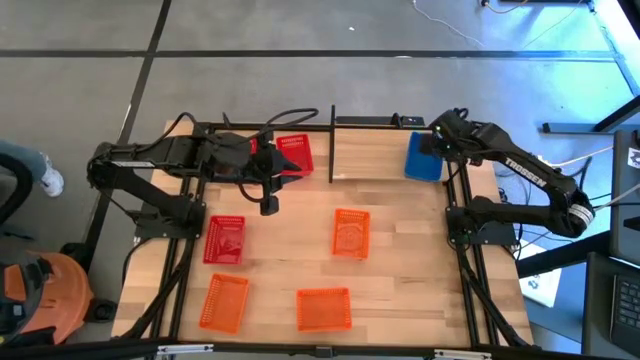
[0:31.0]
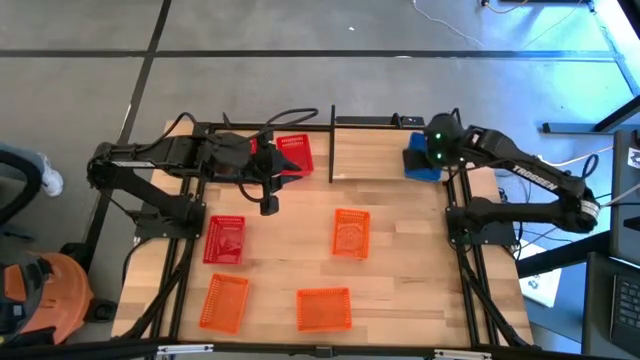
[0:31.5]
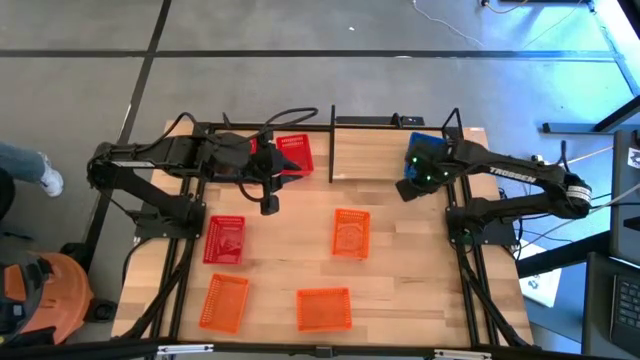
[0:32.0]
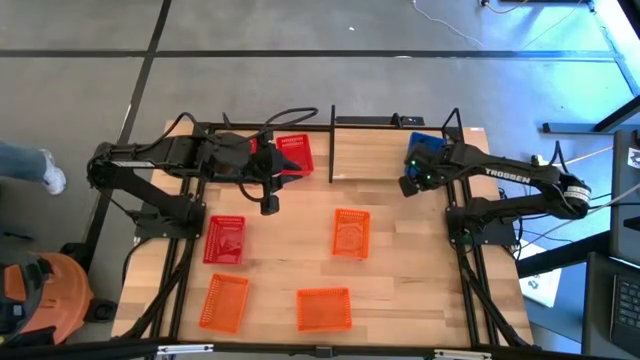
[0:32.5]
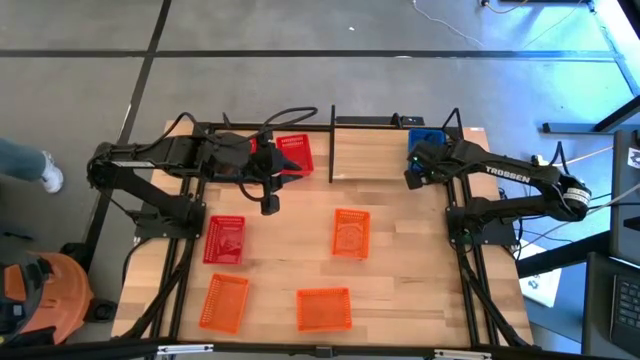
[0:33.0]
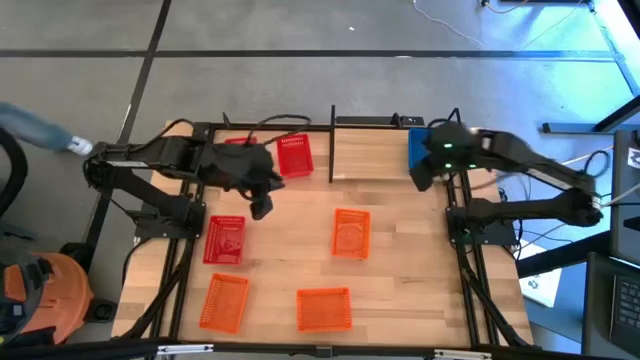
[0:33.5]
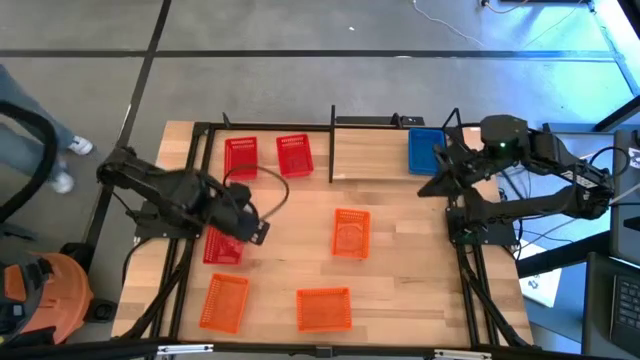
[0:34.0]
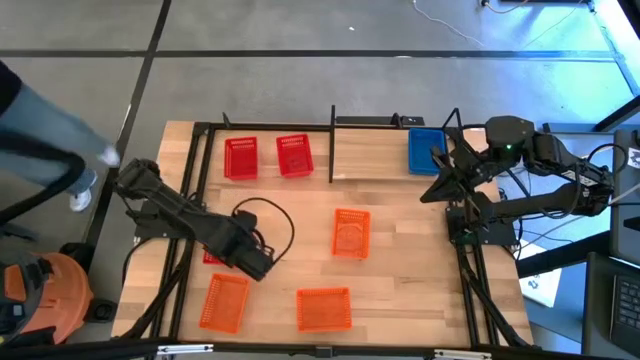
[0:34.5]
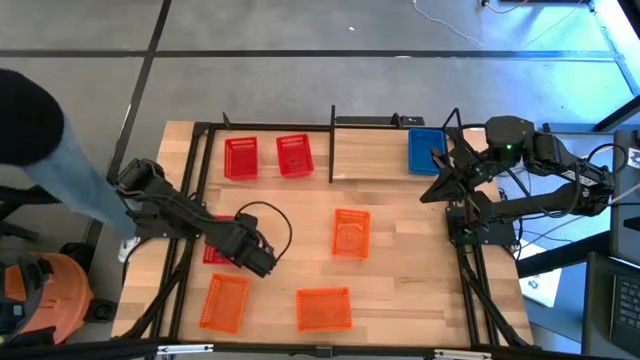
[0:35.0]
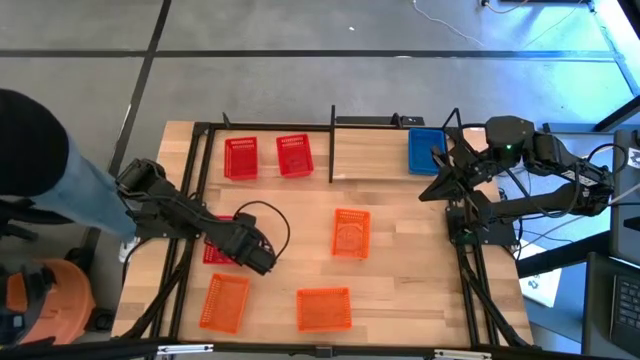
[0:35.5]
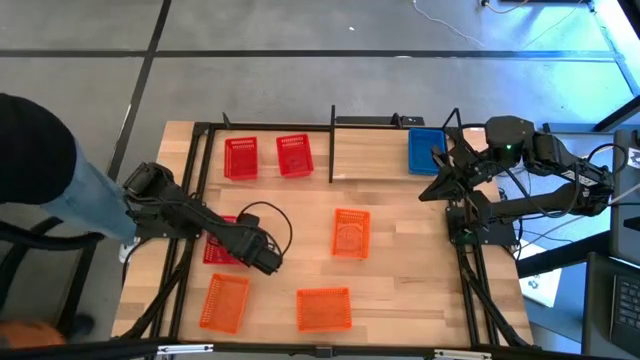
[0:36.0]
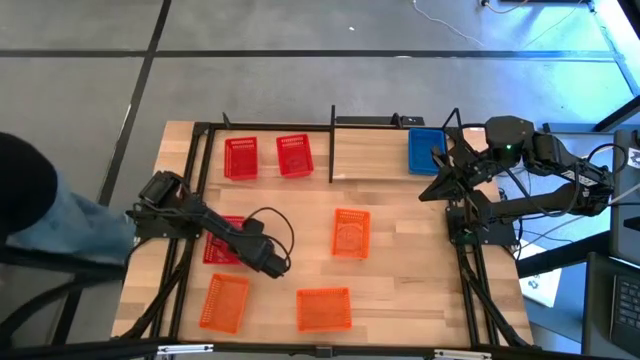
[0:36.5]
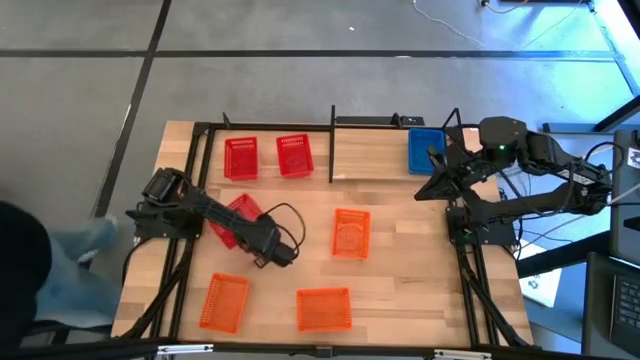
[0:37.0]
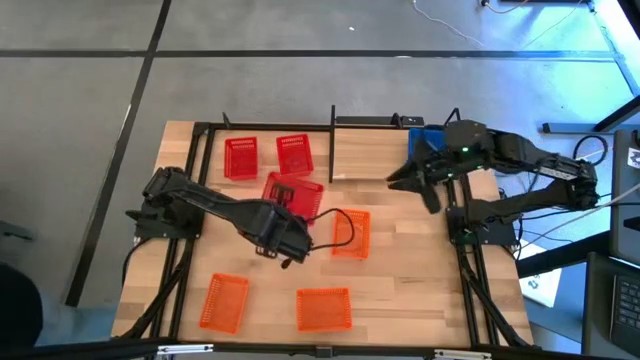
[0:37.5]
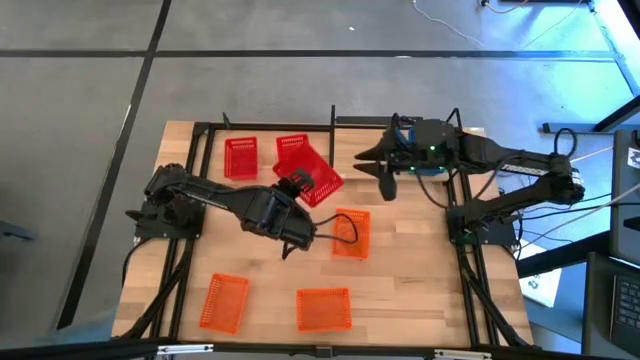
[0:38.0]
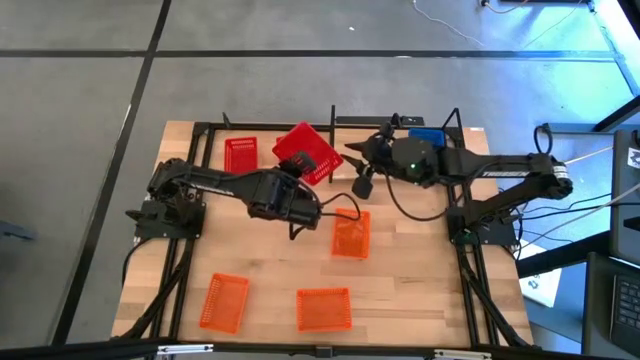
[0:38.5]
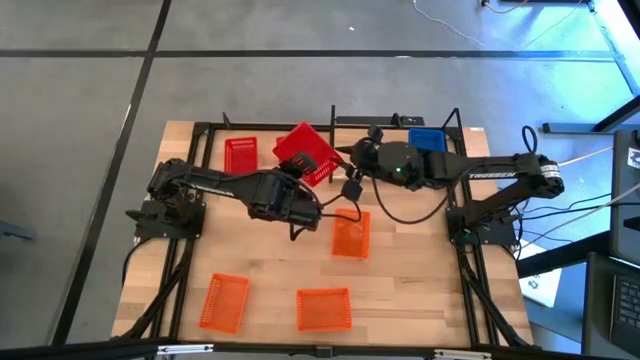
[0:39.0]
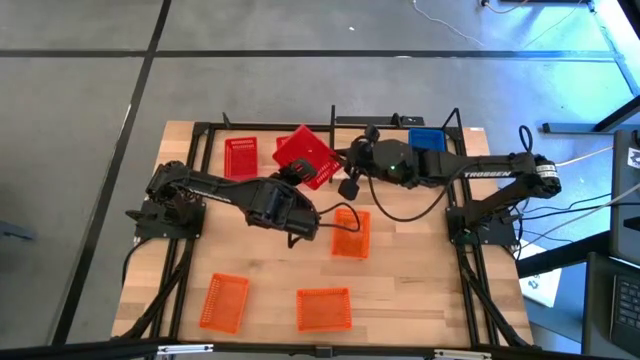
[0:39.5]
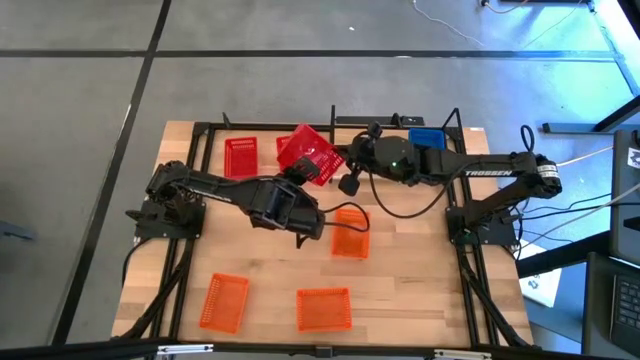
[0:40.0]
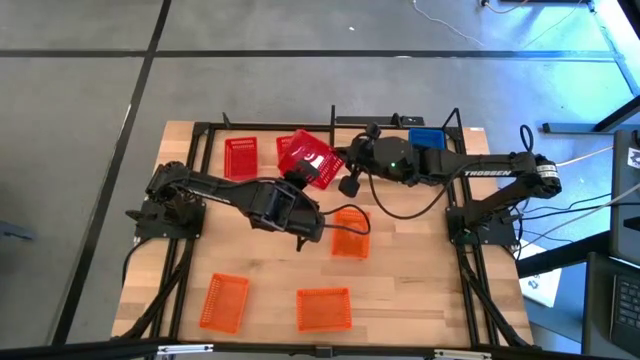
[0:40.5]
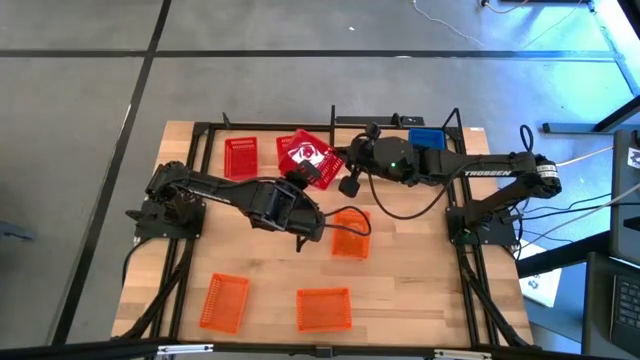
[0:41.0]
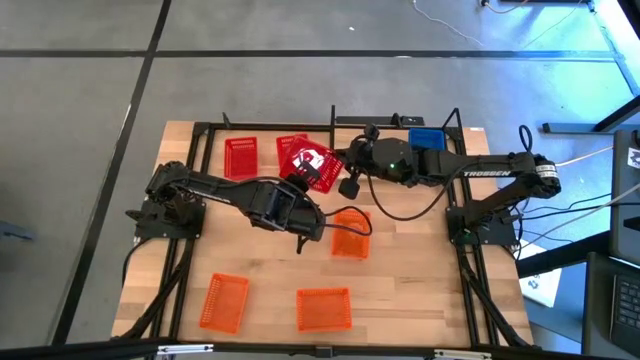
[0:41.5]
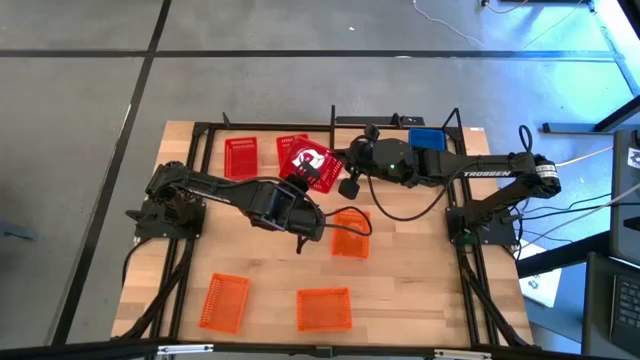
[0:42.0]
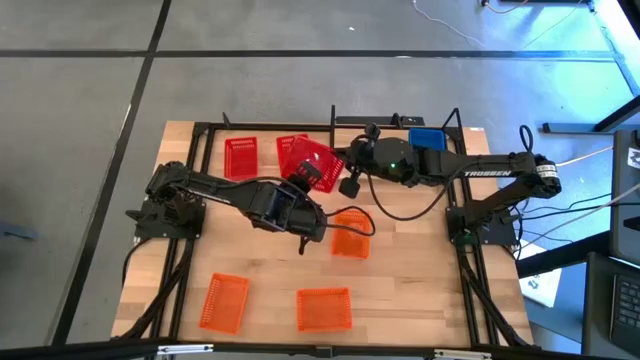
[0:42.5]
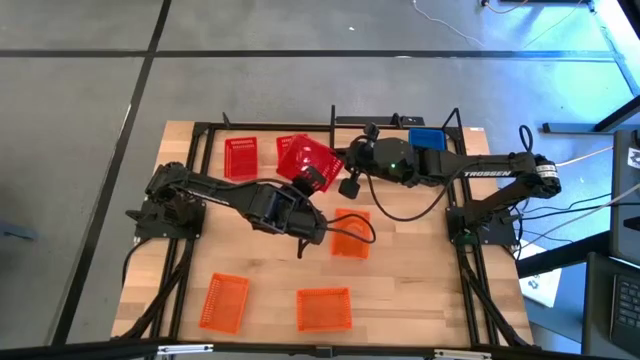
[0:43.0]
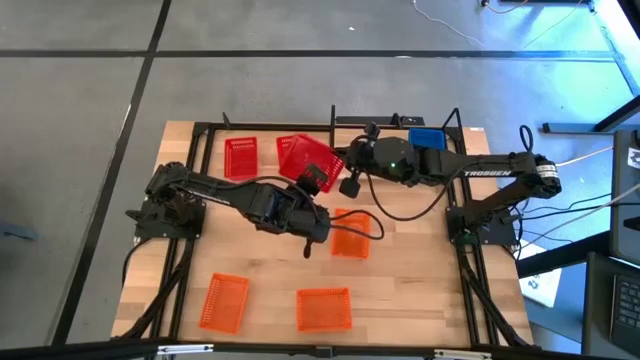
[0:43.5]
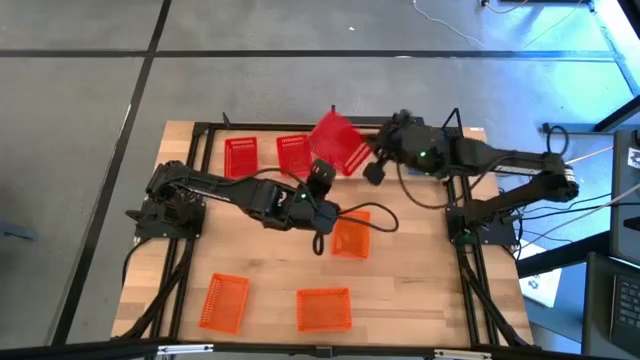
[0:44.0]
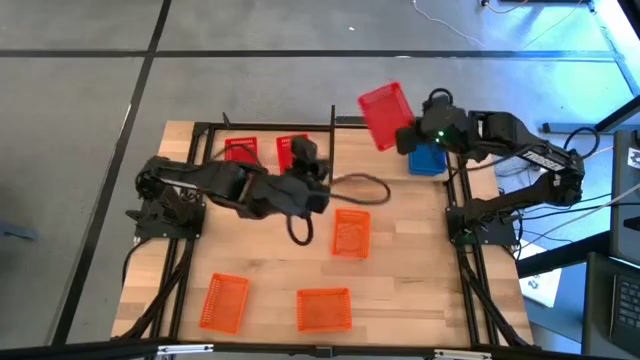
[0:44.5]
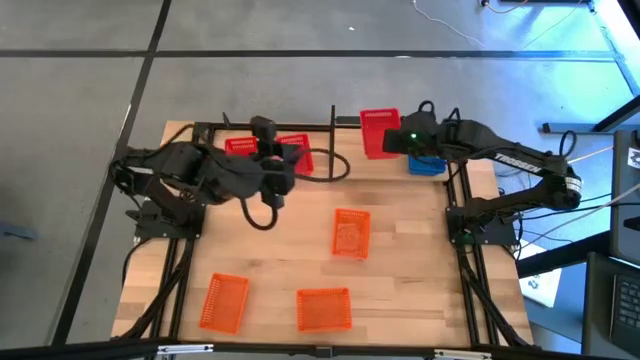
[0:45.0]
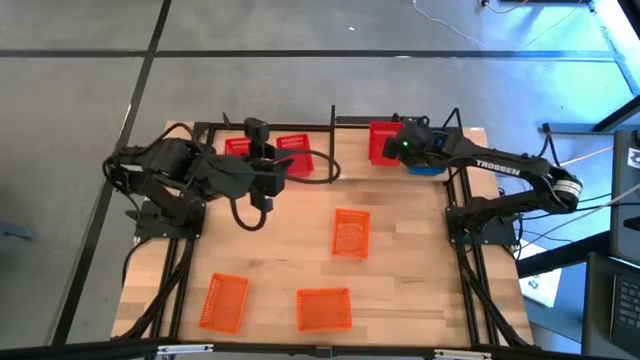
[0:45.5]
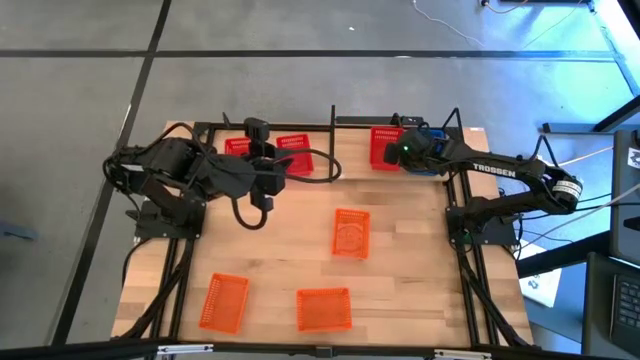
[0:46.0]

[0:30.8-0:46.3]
Task: Stack baskets on shelf by color
Put the bottom red basket on the shelf

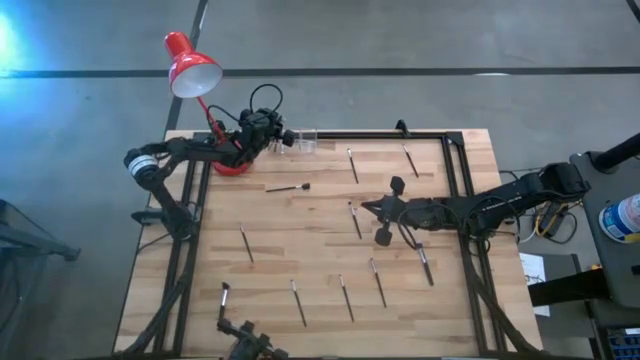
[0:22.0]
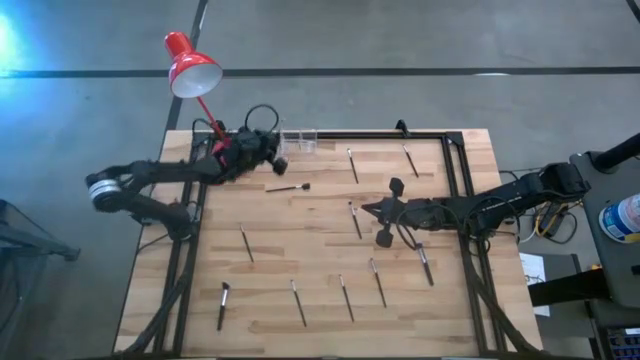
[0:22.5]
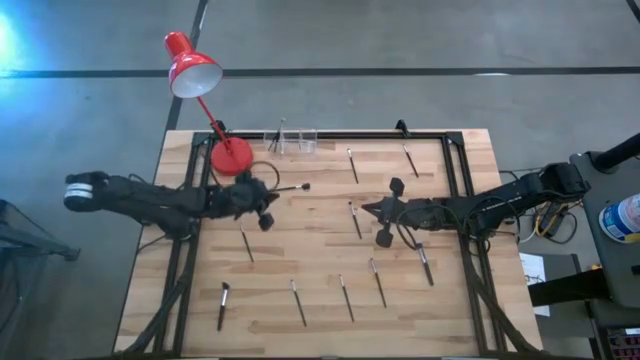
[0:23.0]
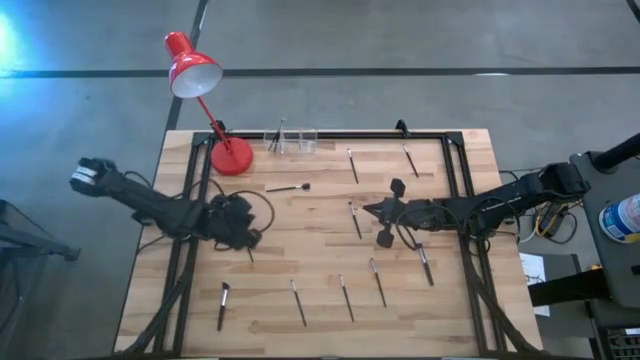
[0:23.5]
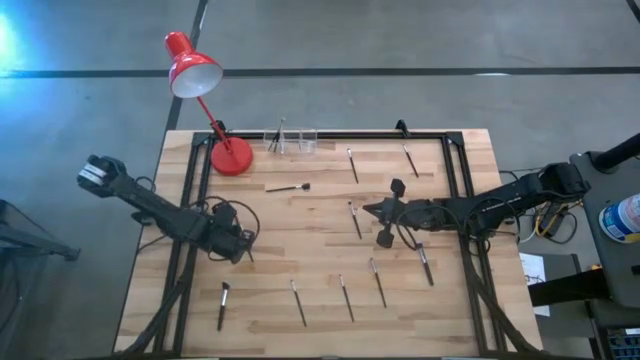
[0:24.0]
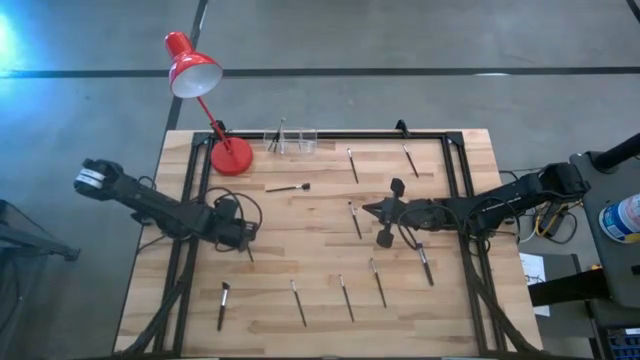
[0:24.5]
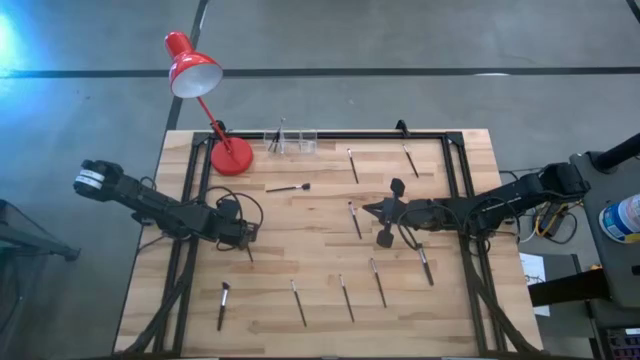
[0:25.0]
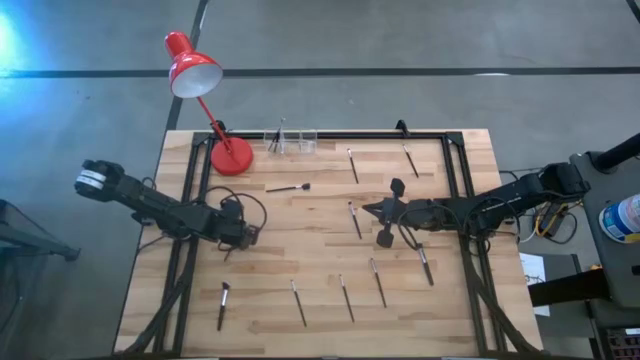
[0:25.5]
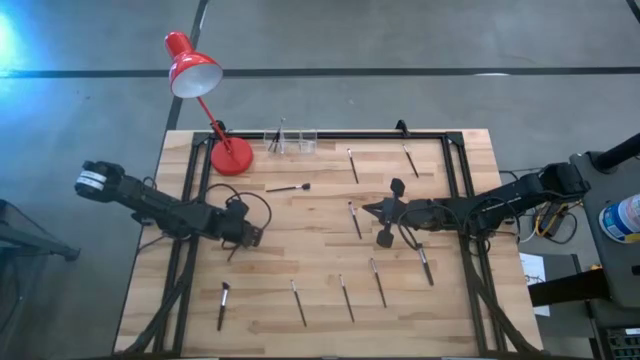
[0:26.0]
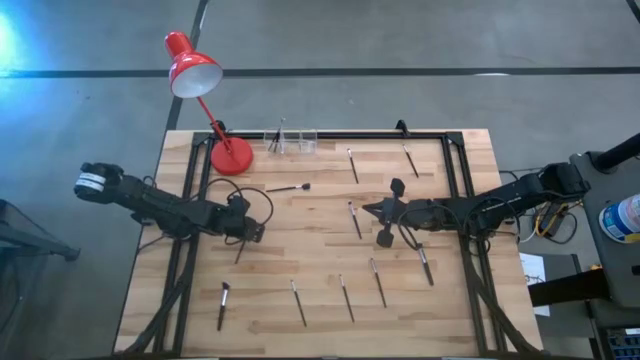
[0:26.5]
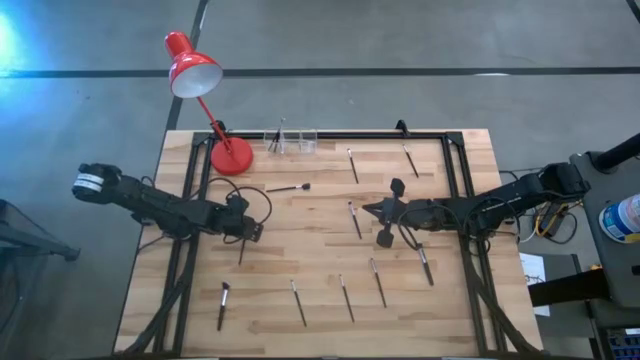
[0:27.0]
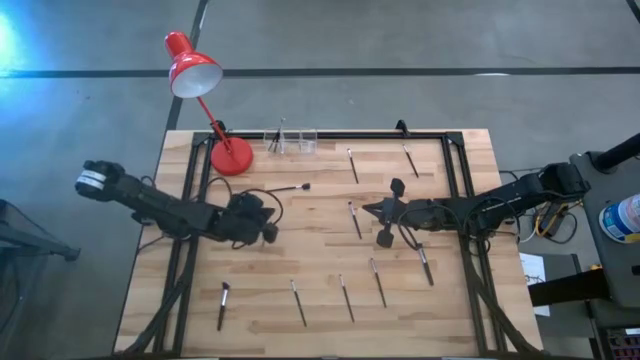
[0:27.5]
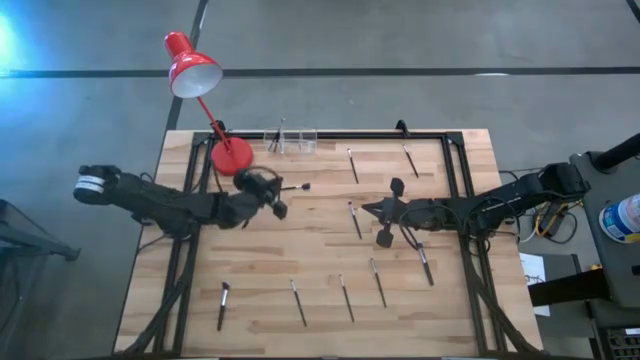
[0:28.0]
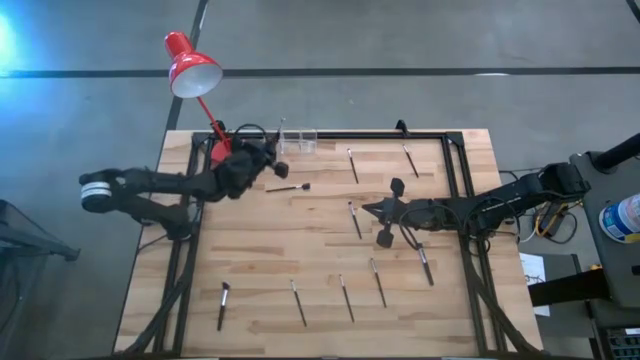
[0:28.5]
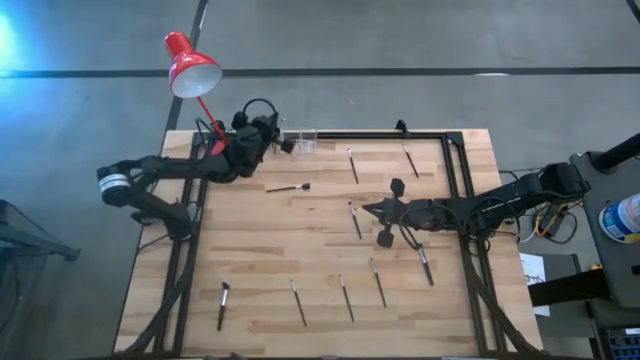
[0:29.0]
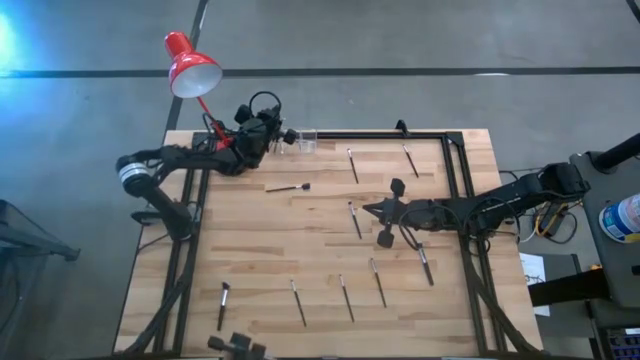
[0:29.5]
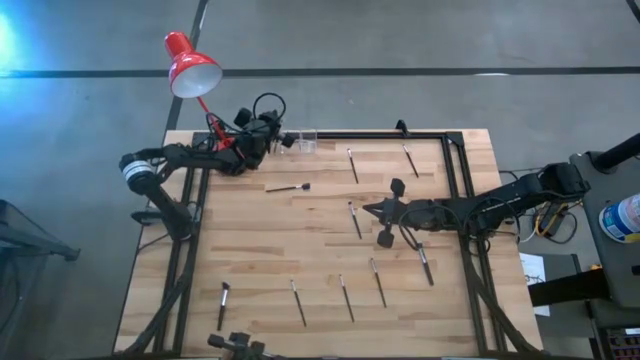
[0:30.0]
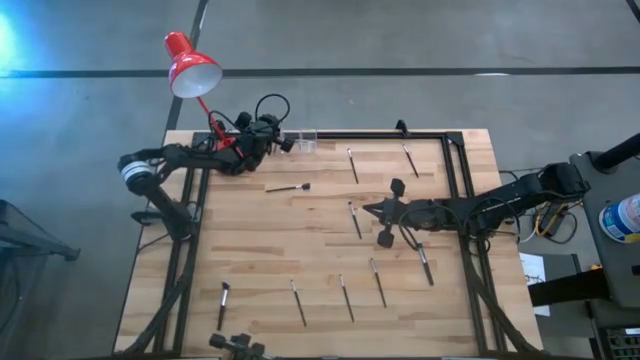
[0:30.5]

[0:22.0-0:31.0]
Task: Pick & Place Makeup Supplies
Put the makeup brush into the transparent organizer
